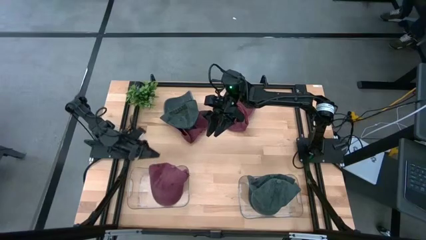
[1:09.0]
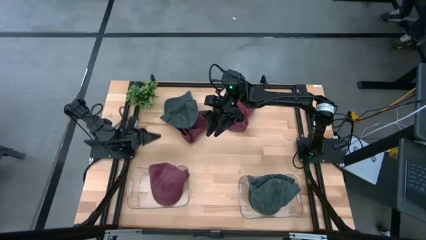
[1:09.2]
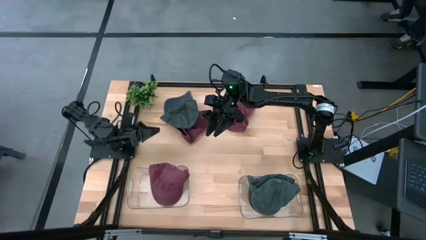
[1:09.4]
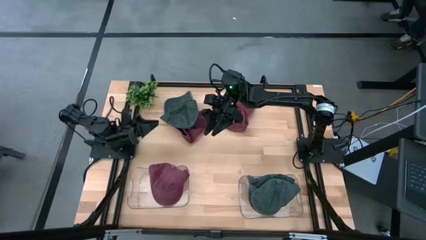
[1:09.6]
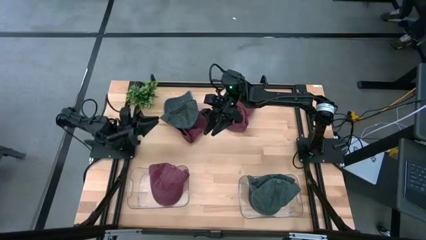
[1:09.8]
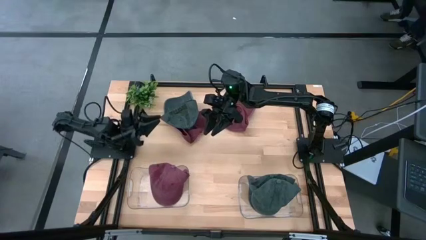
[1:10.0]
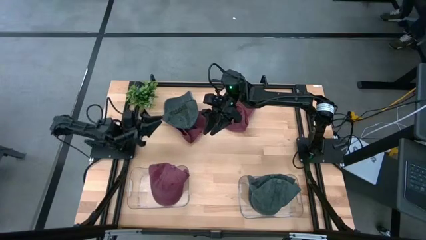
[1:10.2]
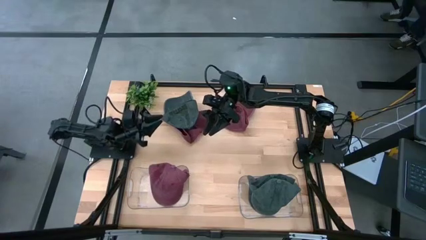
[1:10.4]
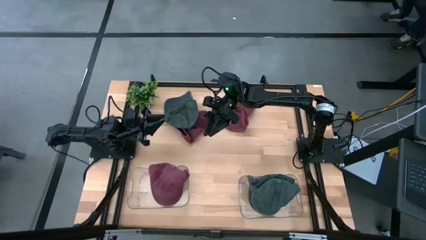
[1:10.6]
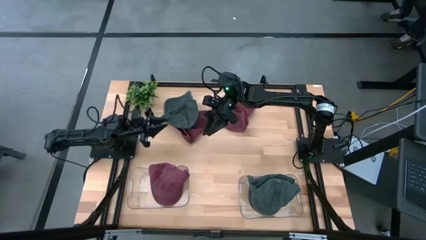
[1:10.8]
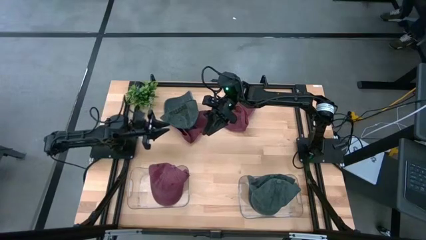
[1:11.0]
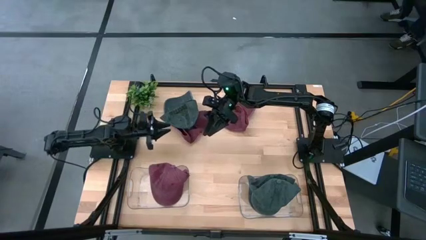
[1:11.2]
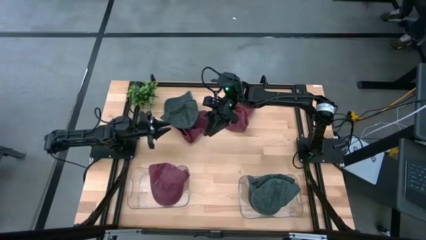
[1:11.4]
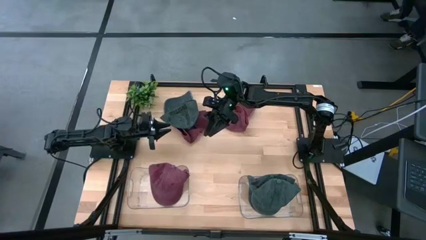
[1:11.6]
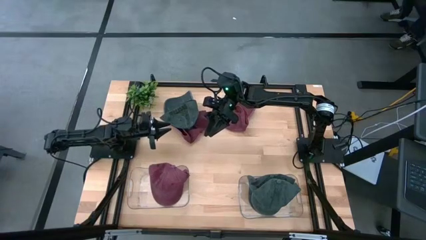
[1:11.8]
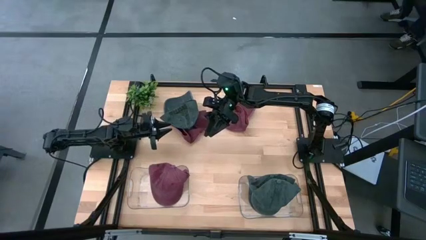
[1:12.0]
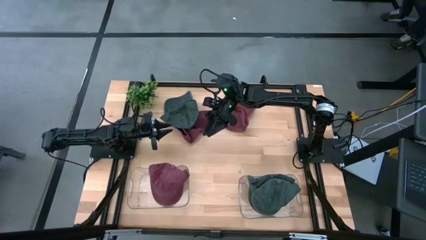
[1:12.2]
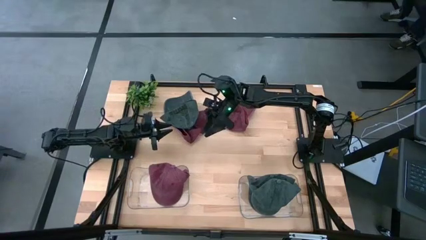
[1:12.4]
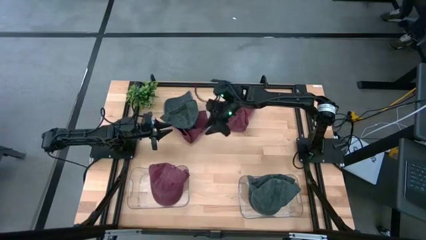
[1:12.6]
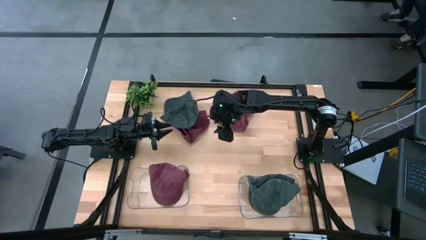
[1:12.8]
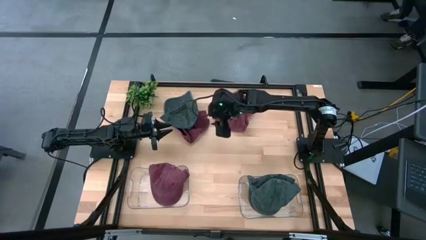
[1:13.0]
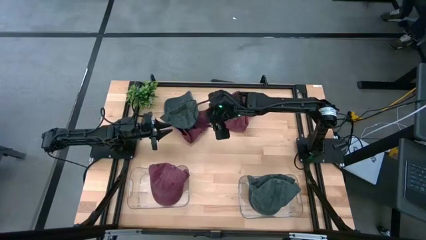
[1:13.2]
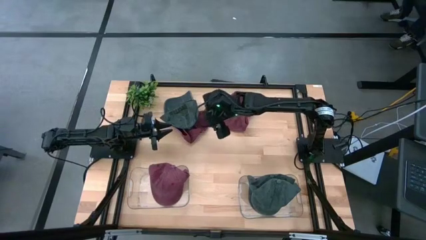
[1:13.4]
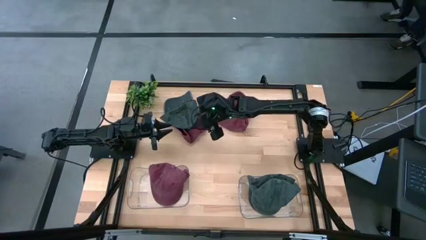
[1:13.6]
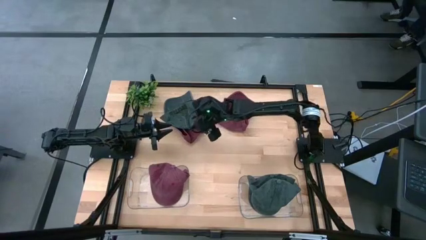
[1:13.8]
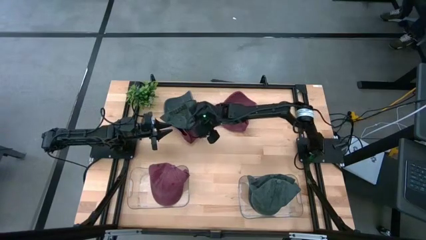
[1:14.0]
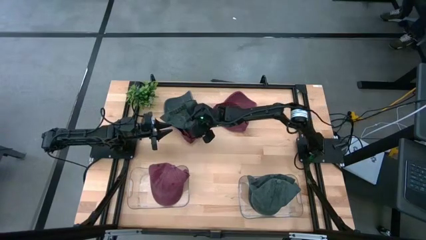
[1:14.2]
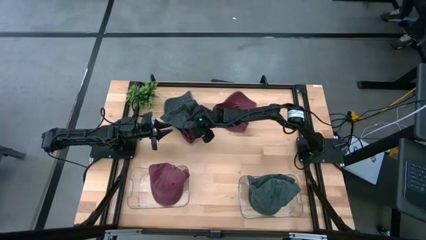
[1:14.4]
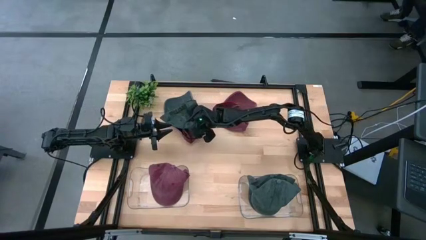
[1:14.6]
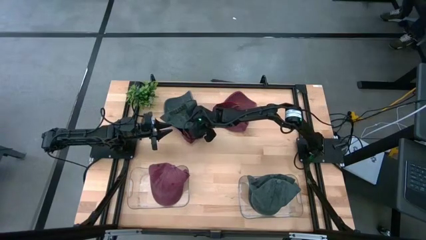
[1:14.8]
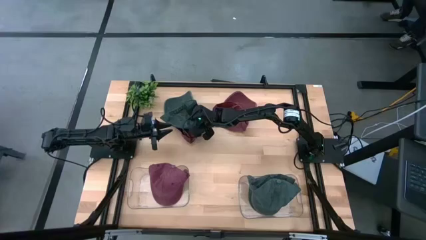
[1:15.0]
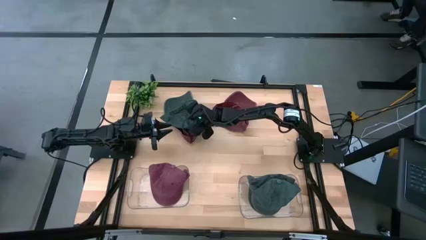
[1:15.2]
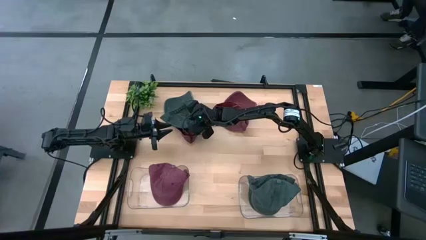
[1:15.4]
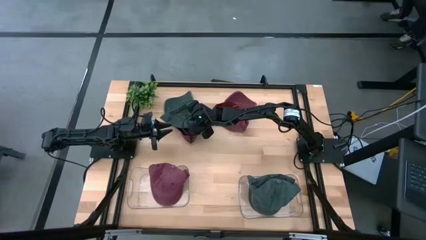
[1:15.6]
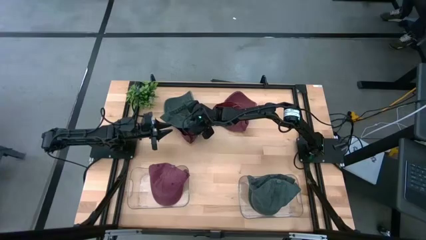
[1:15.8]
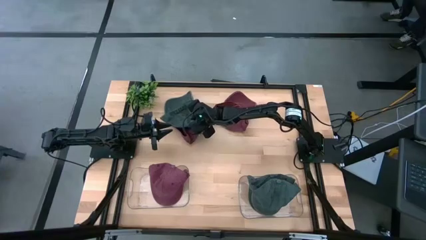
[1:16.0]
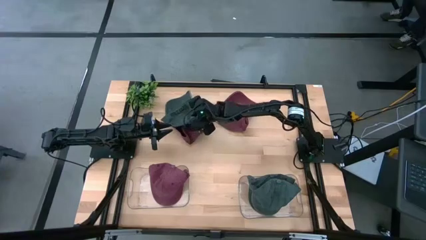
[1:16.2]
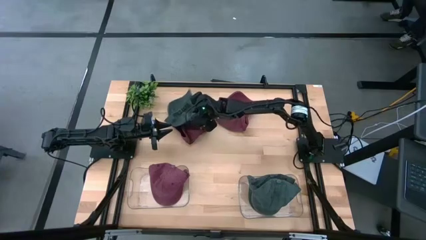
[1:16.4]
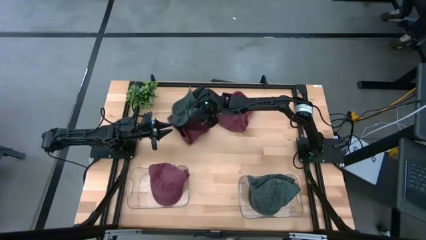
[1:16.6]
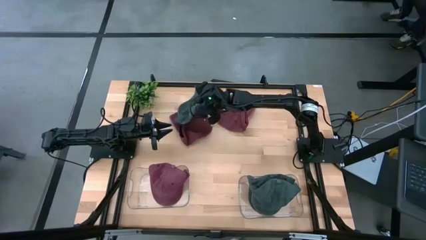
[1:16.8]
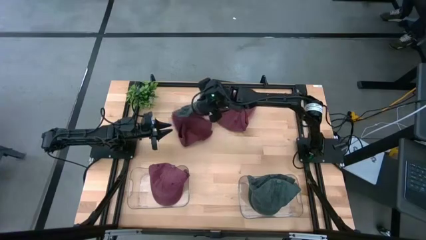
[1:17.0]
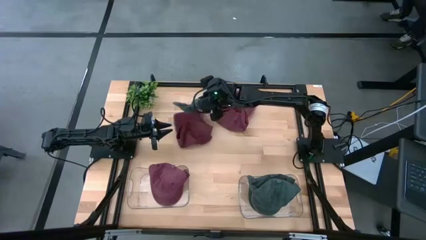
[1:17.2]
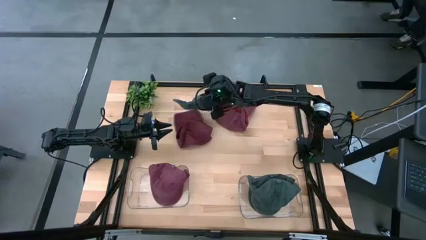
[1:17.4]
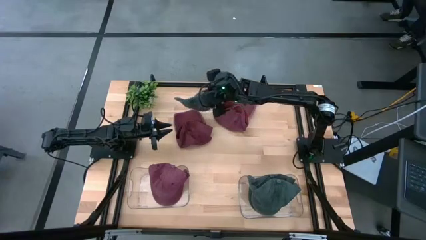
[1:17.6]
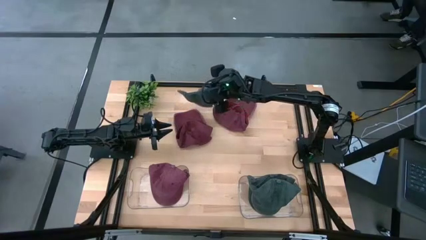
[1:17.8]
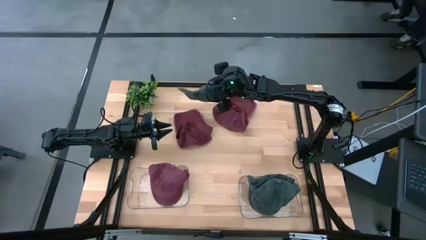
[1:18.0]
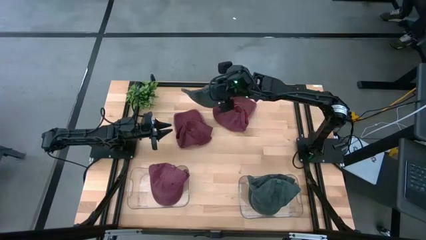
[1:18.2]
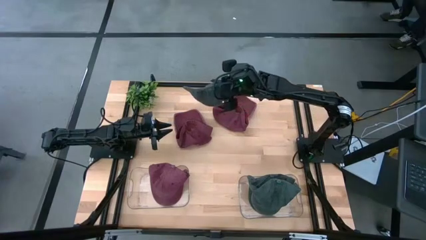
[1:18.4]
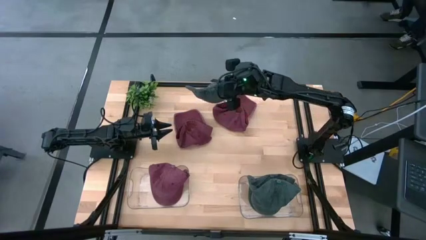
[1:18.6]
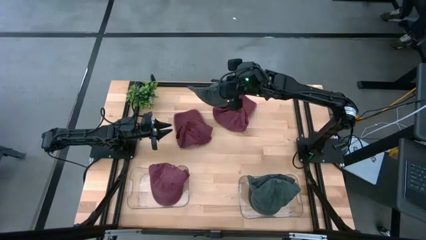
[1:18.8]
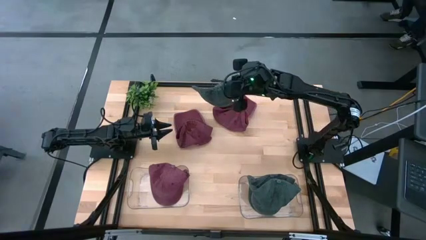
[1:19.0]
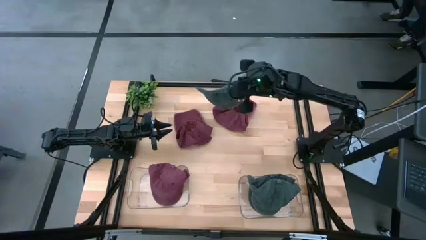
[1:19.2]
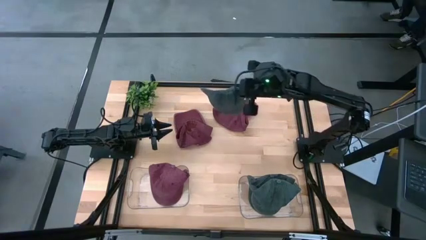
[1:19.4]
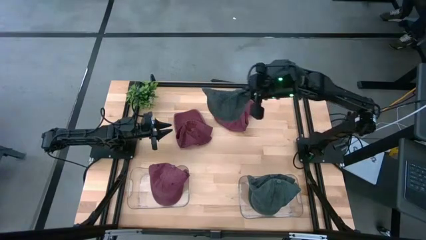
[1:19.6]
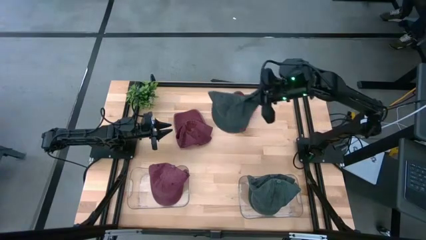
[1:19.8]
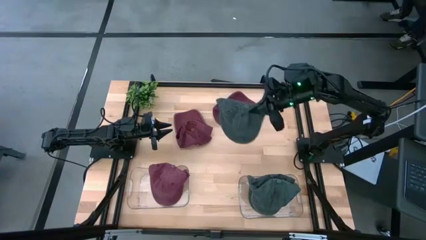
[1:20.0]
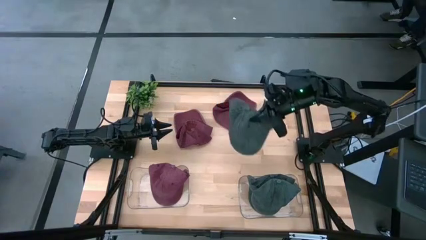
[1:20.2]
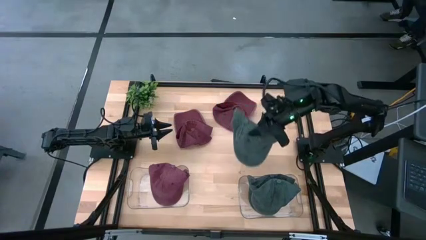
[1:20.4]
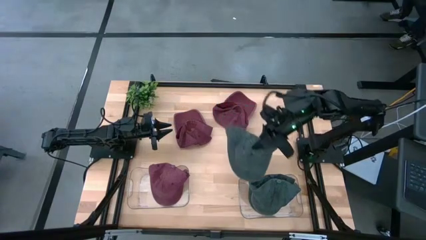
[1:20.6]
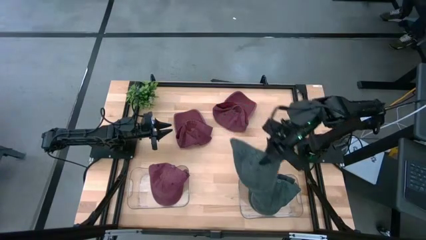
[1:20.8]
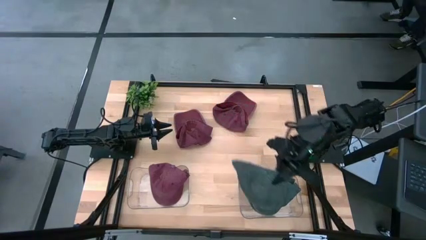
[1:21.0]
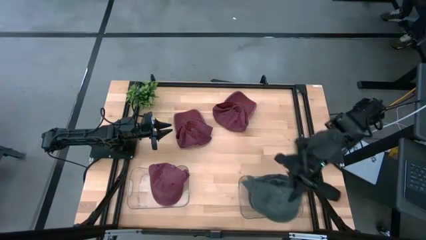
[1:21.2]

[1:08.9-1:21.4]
Task: Pick & Place hat
Put the black cap into the right transparent bin

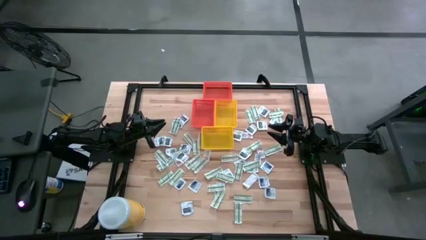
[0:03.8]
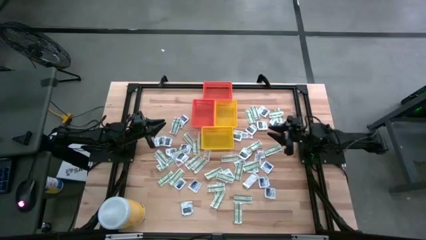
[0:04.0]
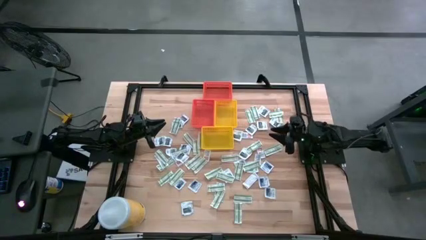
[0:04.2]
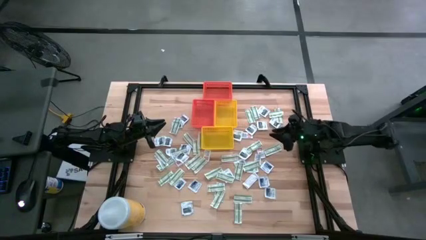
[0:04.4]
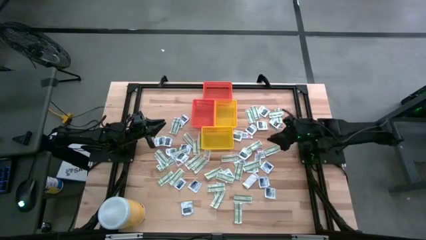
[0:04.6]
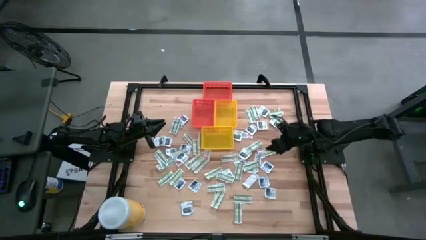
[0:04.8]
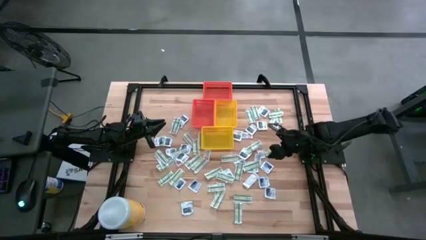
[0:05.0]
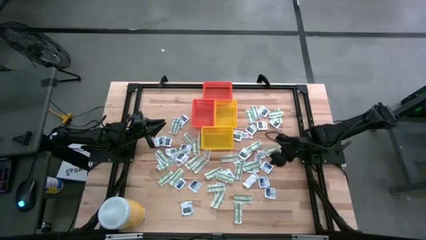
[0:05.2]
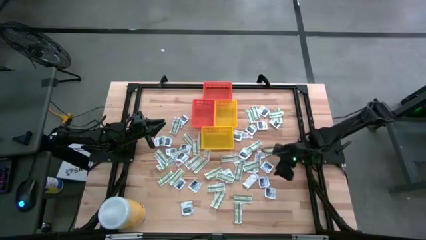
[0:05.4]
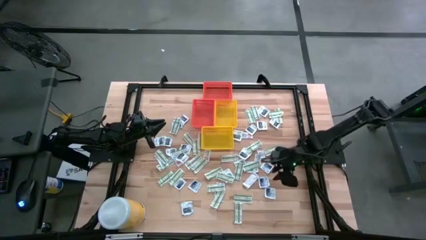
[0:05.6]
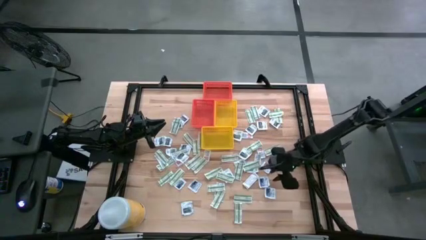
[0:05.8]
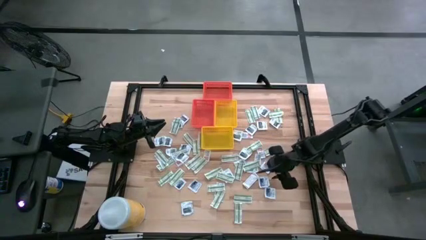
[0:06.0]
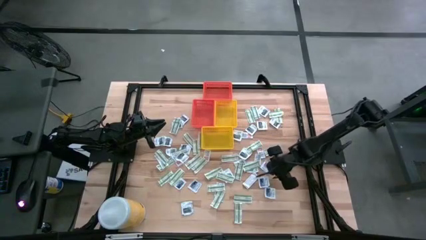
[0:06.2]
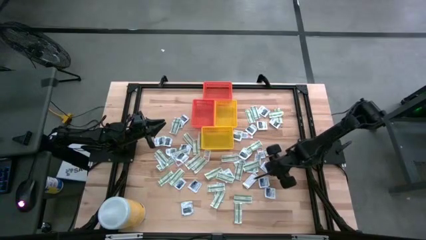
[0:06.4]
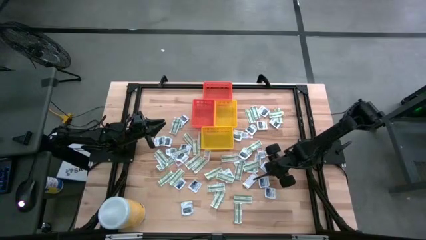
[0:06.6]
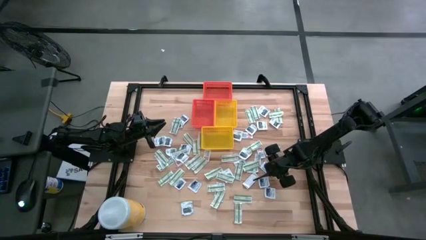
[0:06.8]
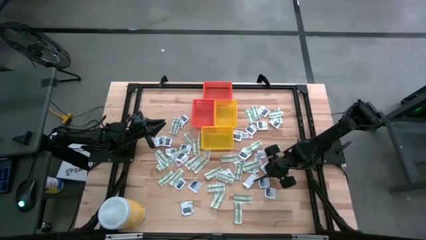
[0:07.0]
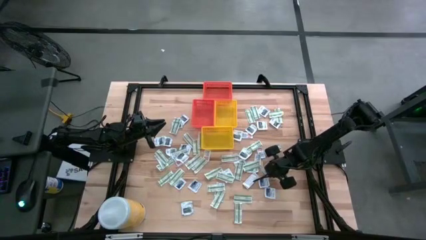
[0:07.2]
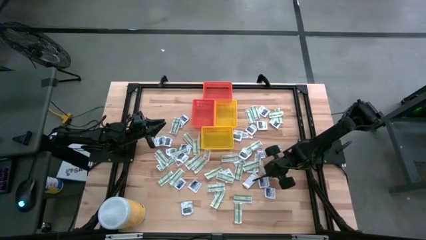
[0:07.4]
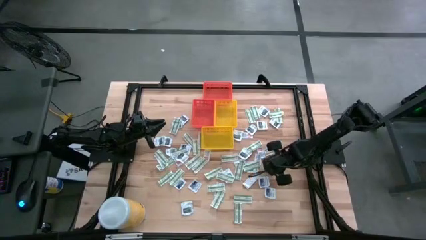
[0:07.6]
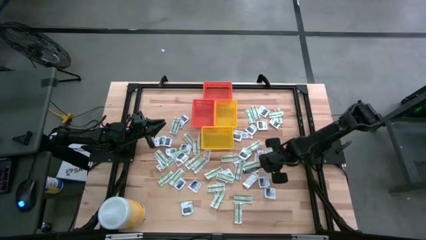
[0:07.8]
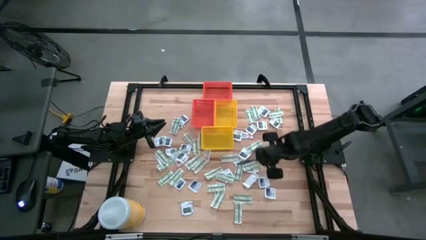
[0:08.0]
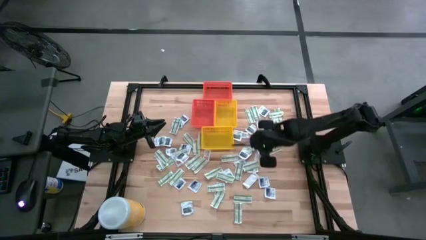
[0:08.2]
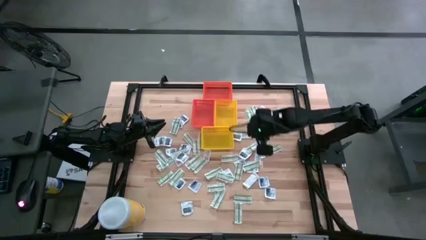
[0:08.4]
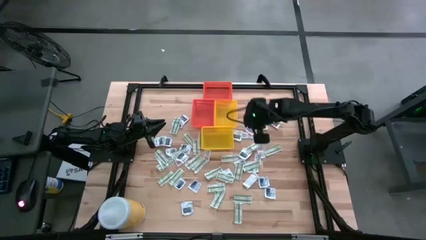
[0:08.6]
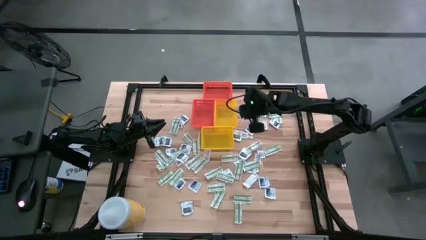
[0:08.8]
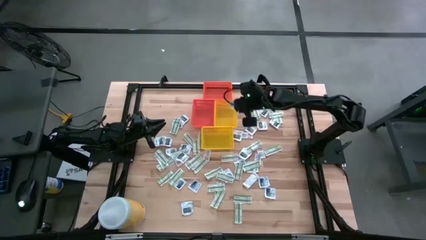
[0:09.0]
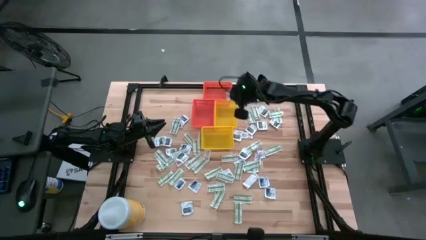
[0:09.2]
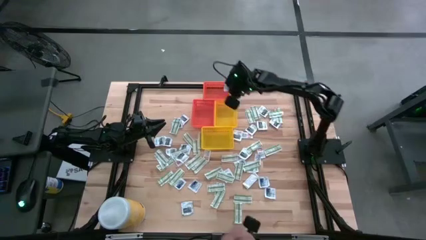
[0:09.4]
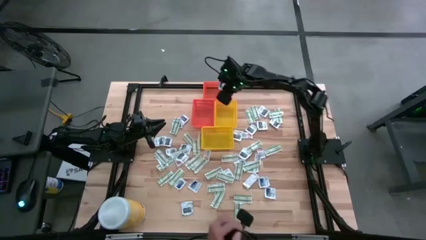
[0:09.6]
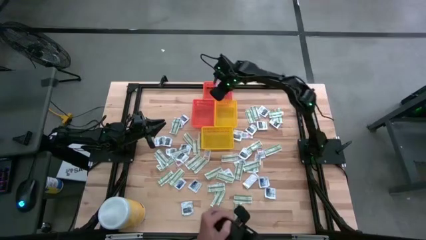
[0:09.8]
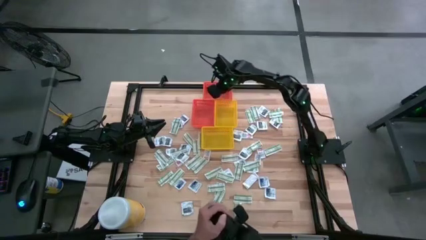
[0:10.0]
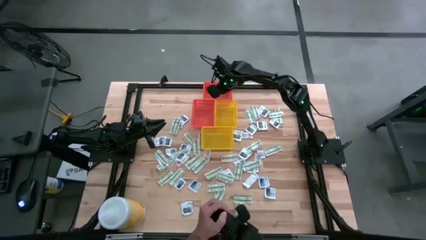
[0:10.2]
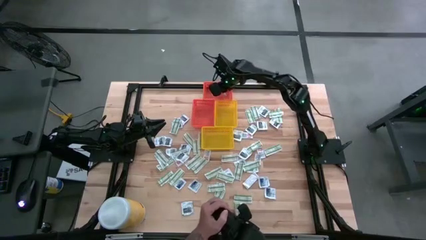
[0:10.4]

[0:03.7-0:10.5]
Task: Pick & Place First Aid Supplies
Put the alcohol pad into the top orange bin
